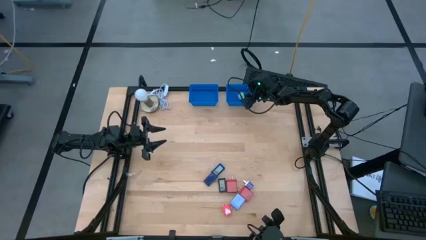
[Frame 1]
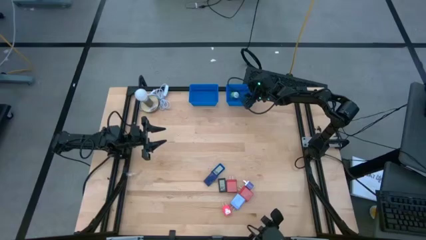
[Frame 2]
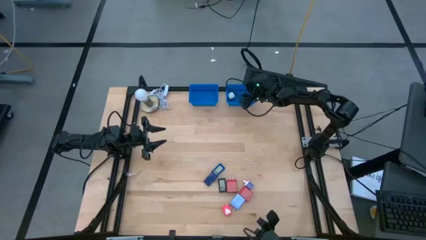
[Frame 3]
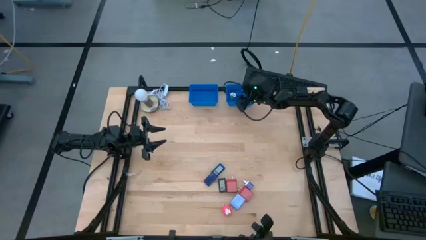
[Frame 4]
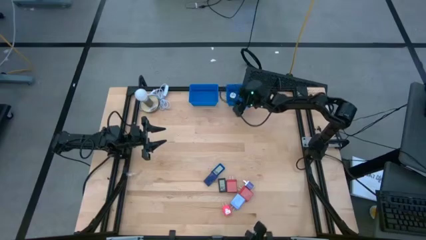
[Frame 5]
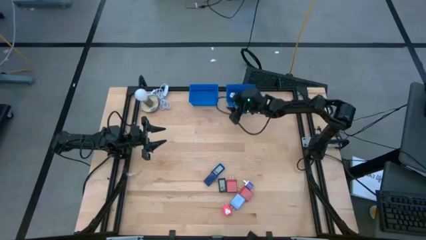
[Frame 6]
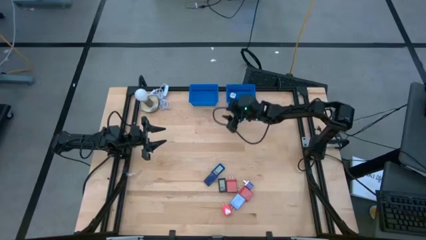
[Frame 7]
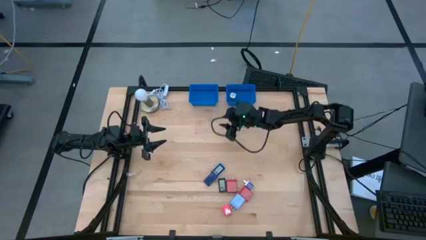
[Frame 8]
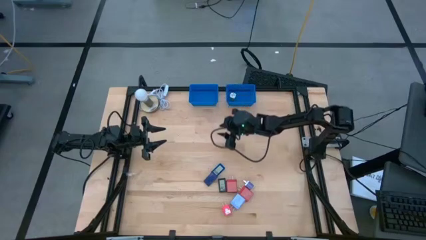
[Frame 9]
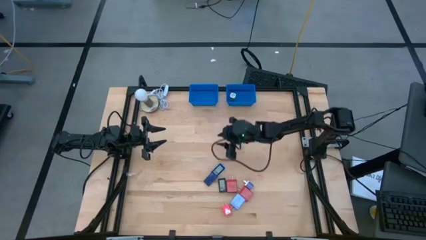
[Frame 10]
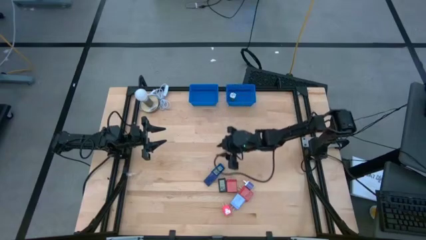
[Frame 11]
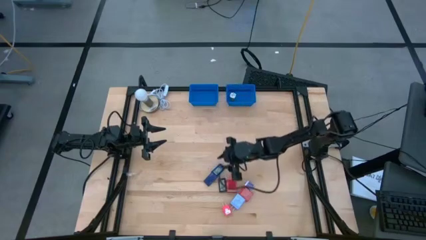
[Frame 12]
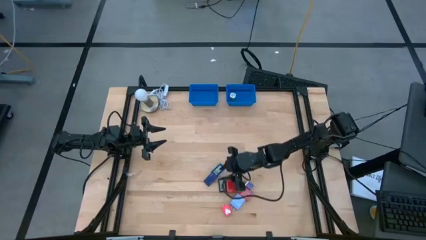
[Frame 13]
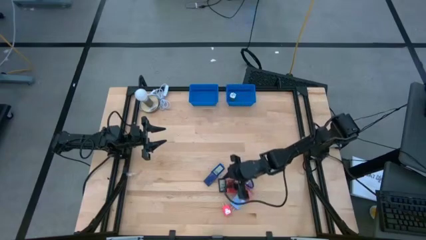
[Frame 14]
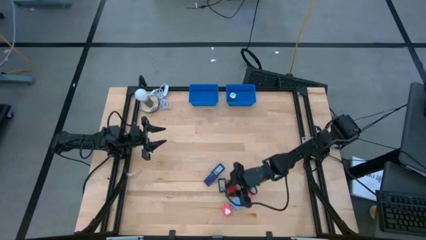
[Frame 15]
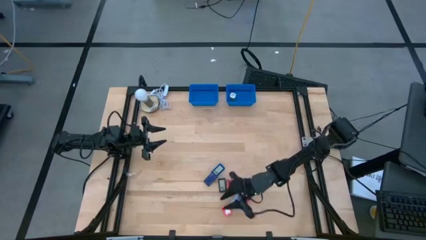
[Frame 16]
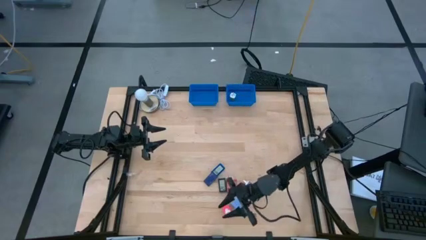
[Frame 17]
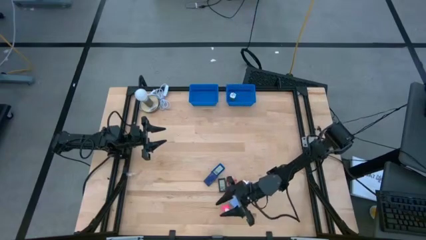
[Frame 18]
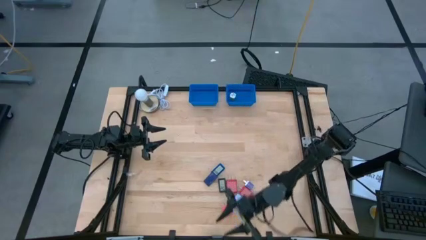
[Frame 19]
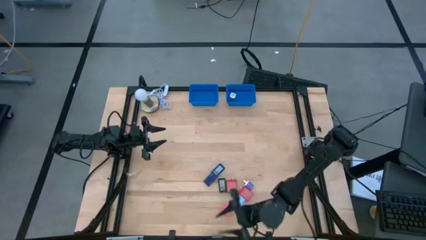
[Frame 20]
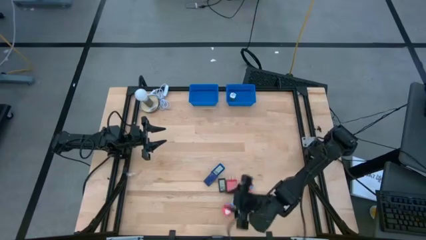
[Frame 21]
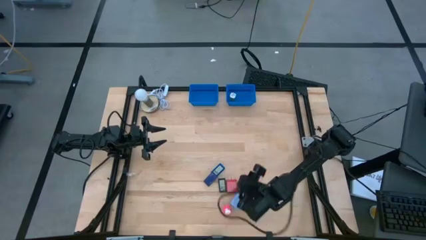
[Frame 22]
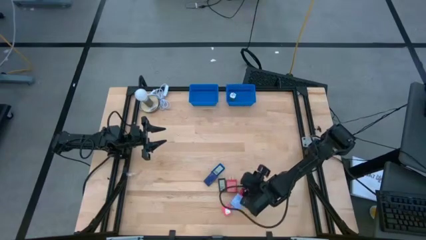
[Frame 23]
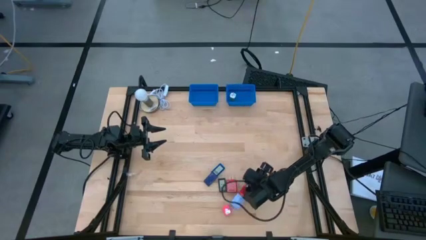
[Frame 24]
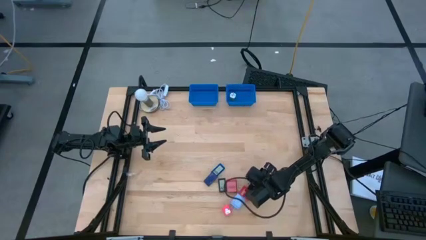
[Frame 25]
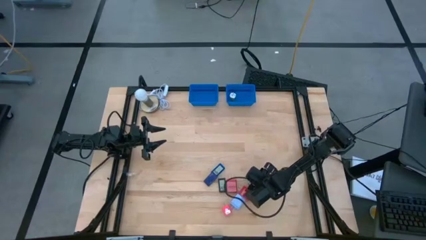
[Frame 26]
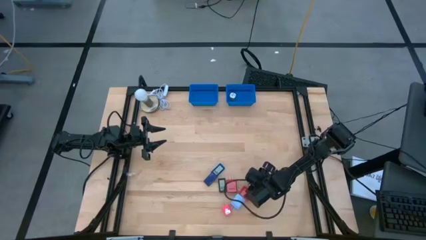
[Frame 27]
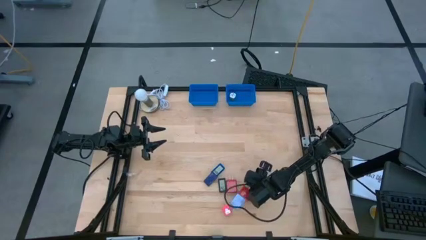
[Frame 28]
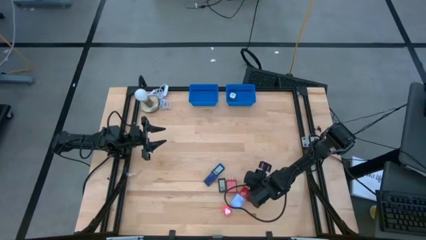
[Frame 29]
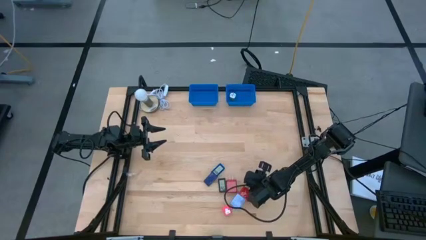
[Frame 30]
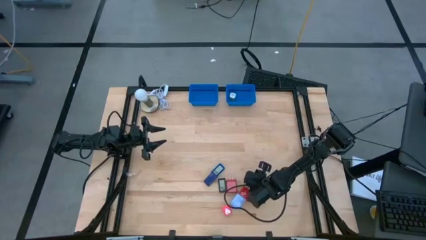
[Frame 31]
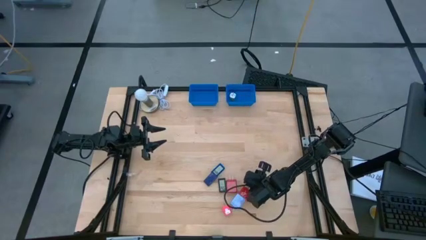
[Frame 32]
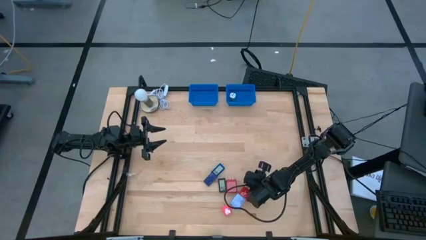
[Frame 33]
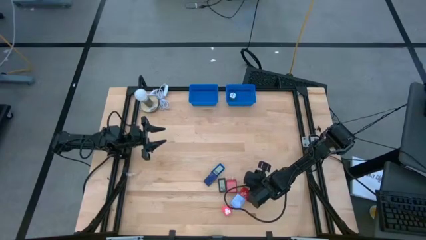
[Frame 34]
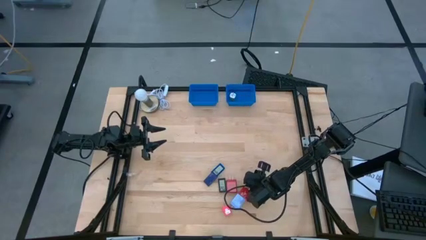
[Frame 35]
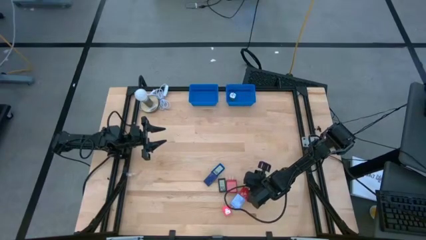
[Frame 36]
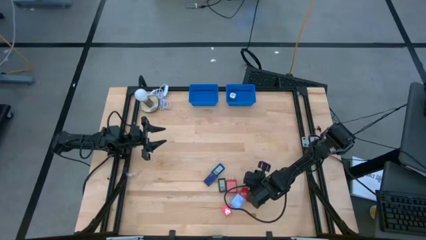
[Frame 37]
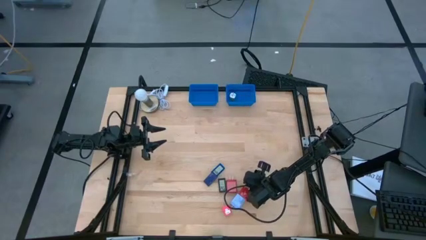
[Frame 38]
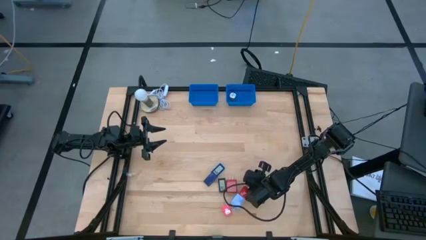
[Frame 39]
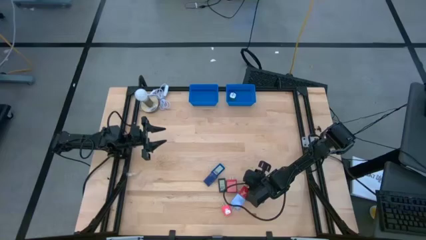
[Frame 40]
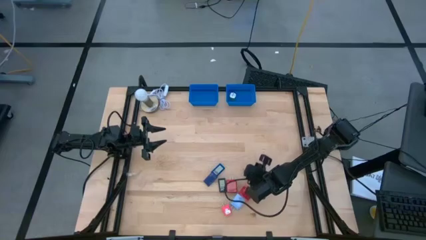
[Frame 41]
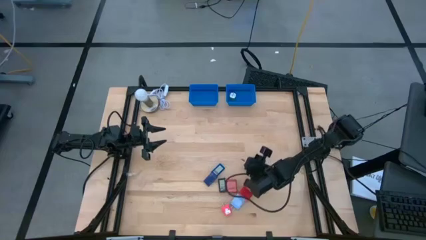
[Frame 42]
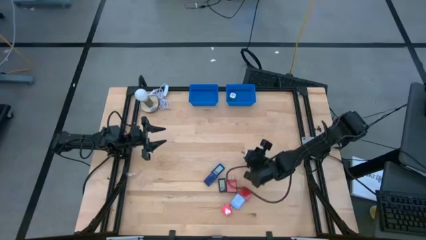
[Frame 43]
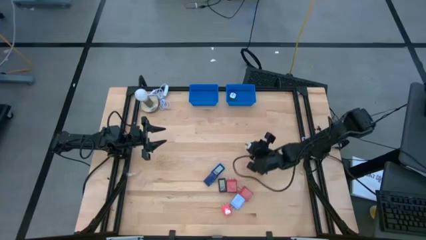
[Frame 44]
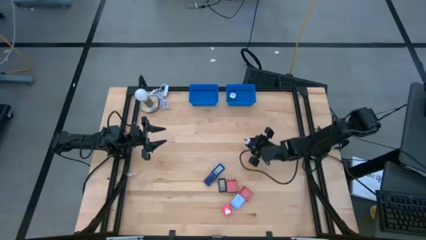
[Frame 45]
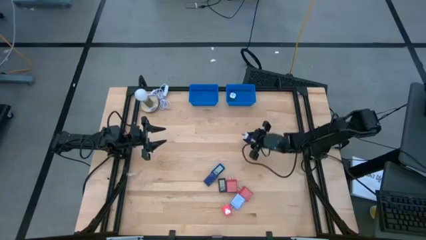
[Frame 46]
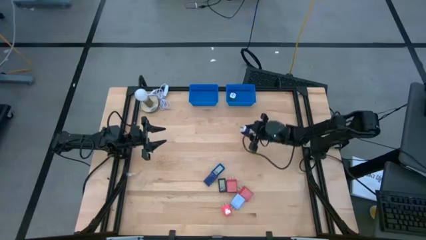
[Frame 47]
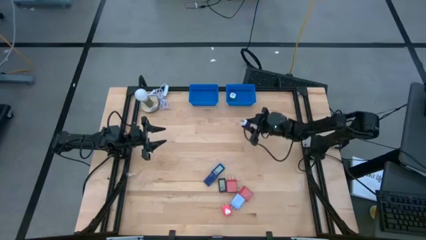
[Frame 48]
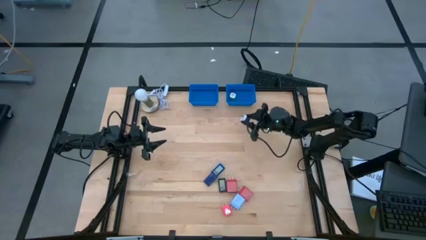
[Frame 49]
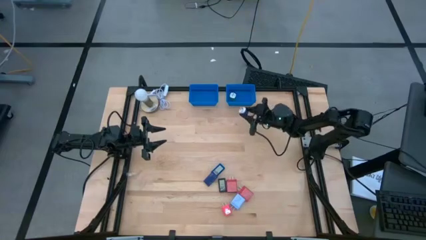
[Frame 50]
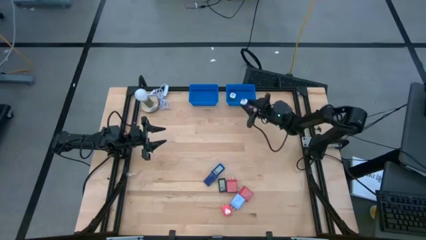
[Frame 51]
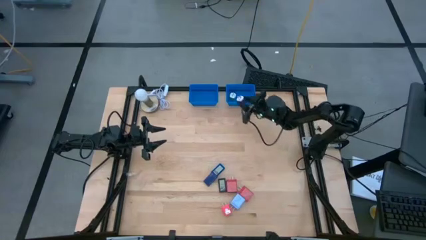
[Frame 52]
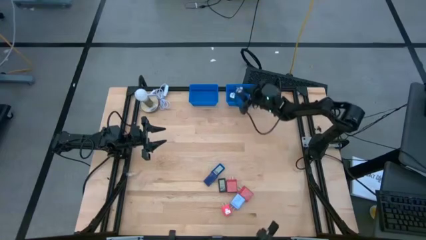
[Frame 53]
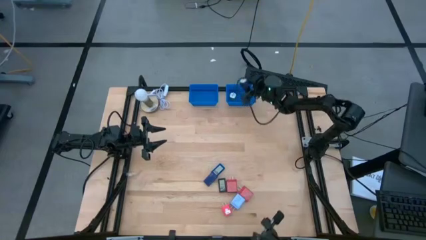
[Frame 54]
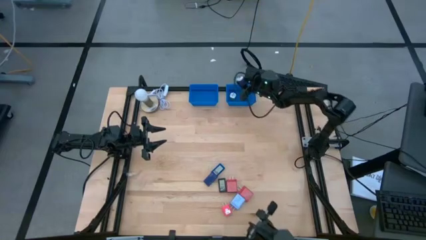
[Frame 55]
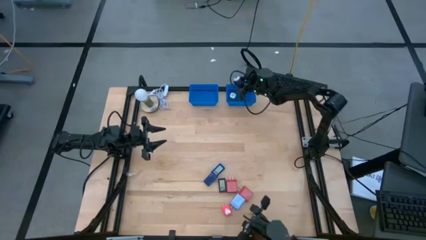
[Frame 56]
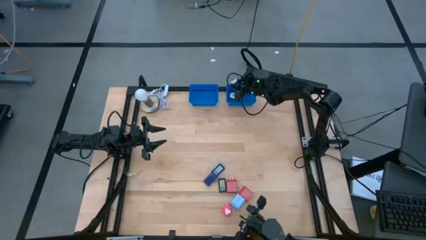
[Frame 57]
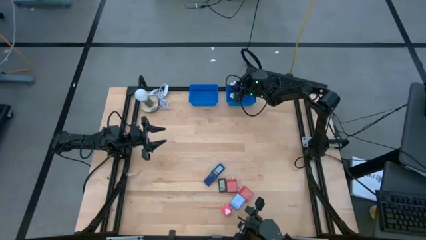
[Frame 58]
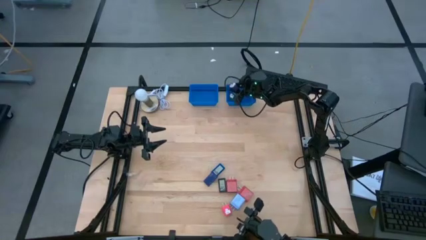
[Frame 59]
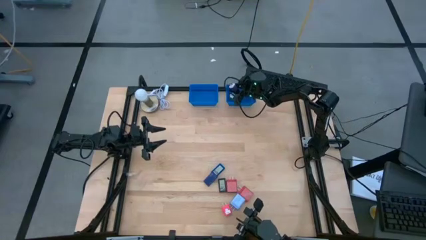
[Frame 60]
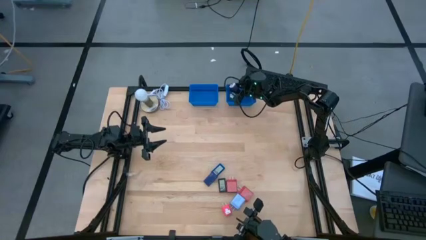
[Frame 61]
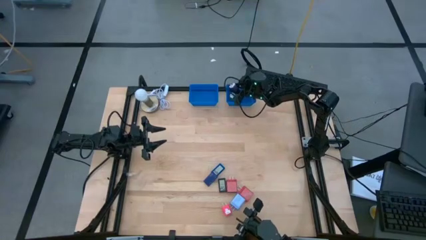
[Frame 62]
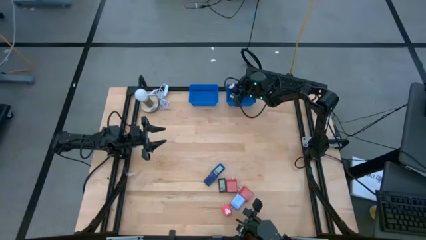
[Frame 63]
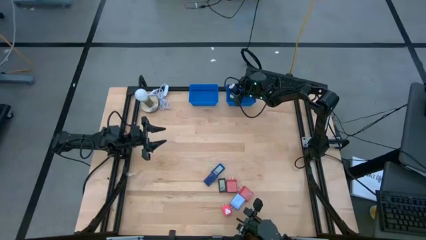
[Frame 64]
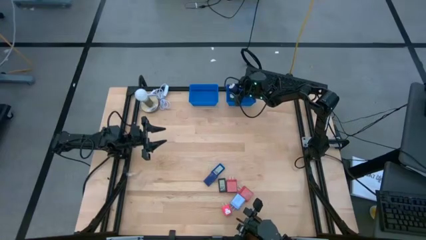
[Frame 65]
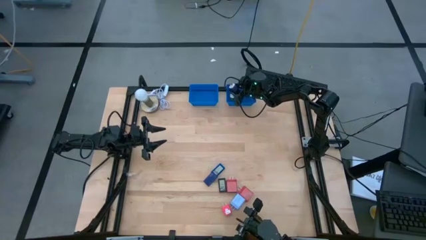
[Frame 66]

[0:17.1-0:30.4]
Task: Pick & Place Office items
Put the blue charger adapter into the right blue bin
